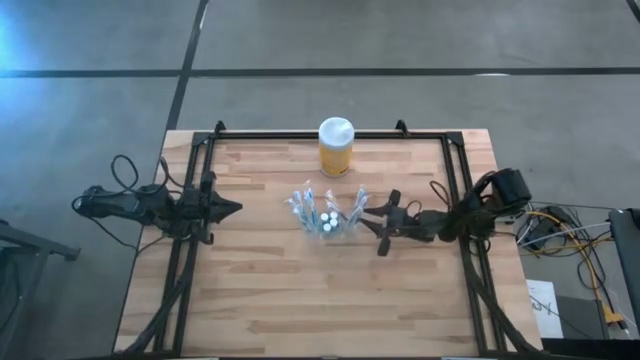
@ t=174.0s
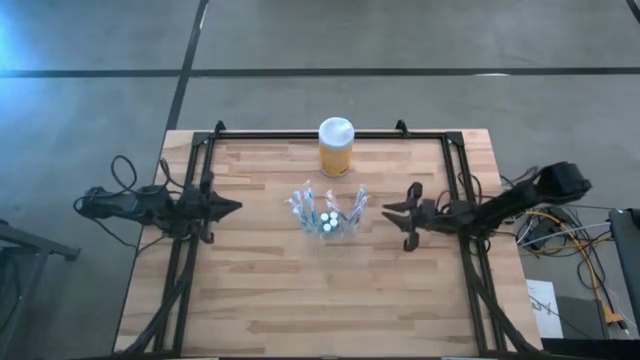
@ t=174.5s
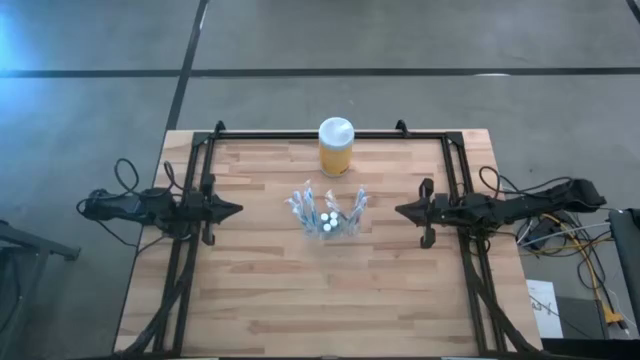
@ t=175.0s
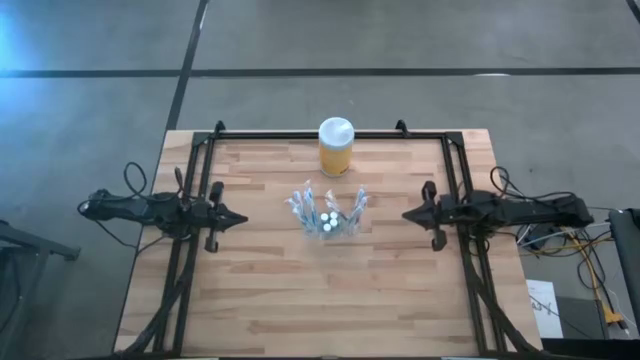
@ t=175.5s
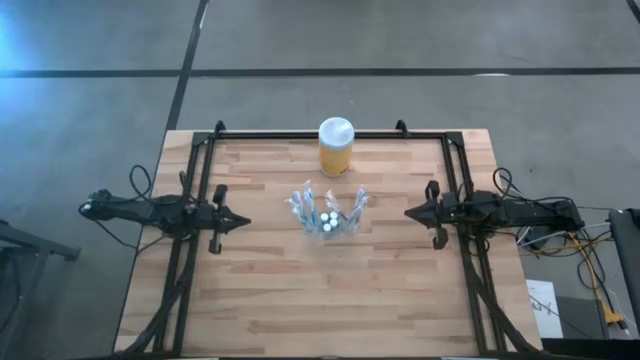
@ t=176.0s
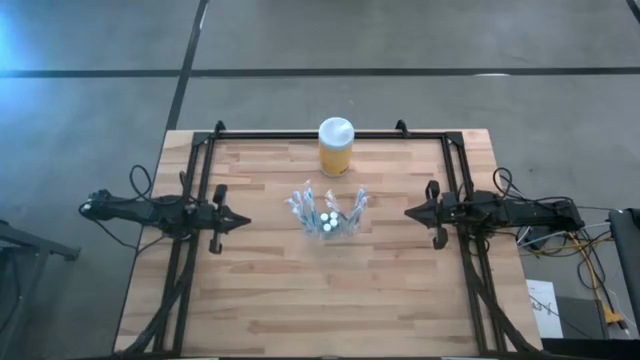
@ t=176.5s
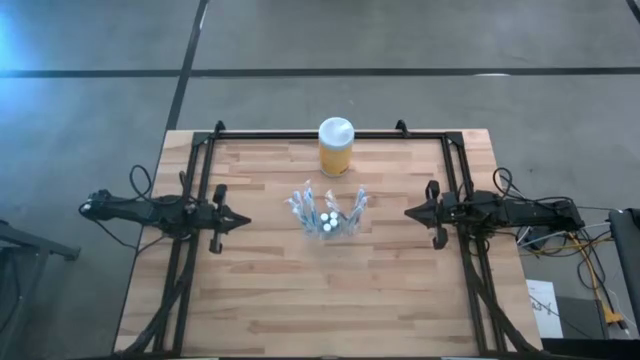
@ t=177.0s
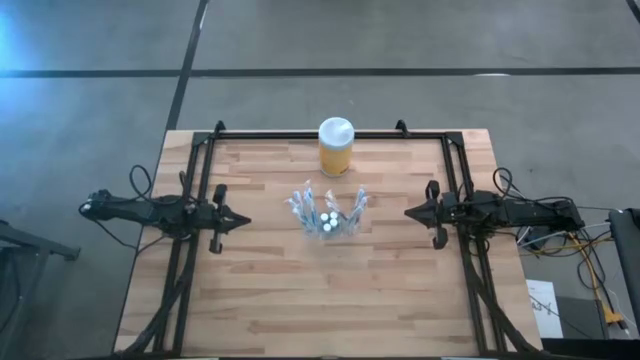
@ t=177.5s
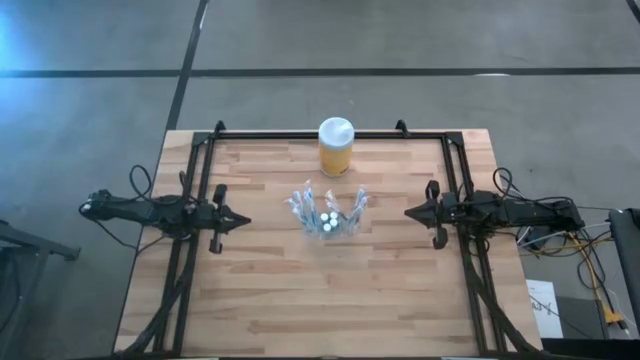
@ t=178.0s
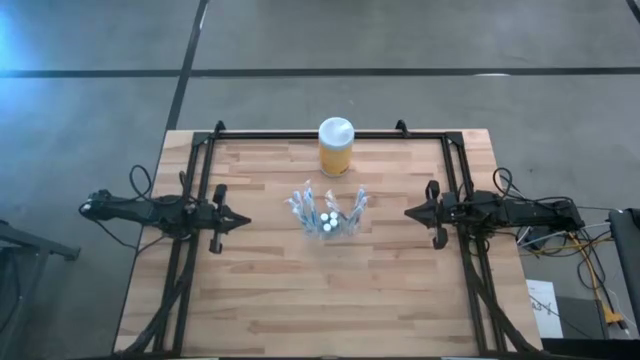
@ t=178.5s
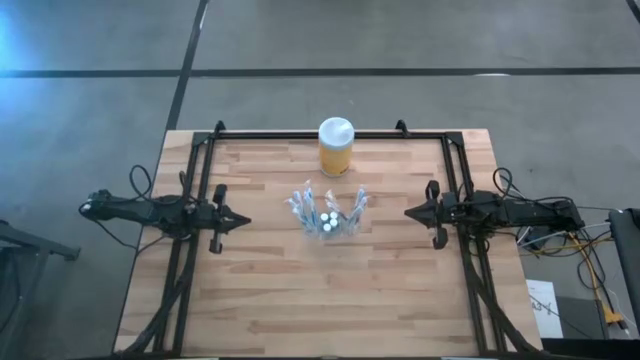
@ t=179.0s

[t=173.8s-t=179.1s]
Task: Pick & Place toothbrushing station
Return to Home Position

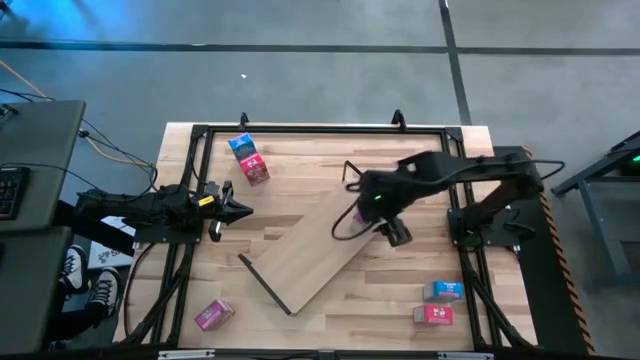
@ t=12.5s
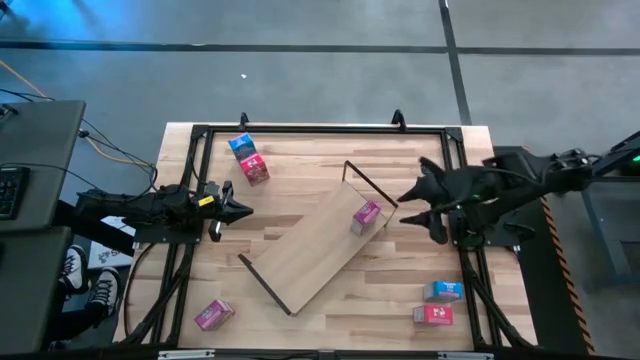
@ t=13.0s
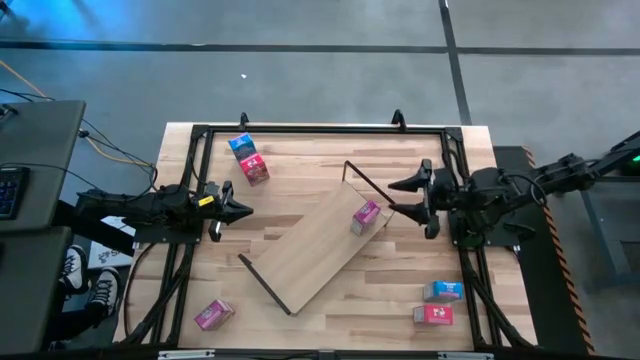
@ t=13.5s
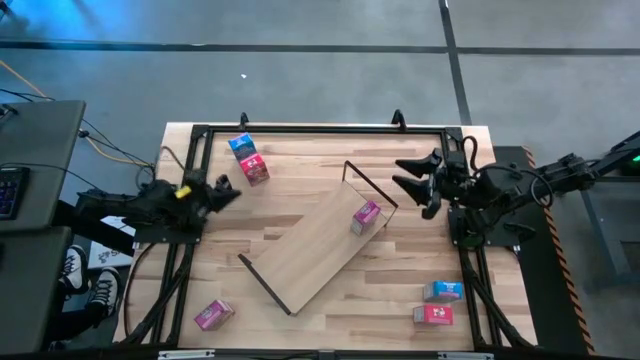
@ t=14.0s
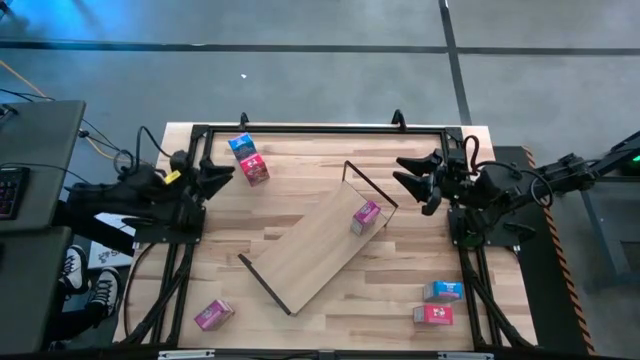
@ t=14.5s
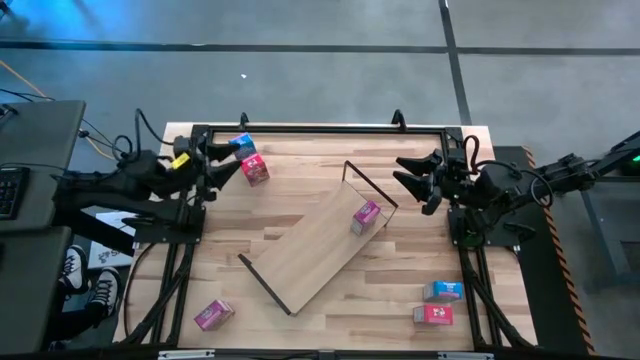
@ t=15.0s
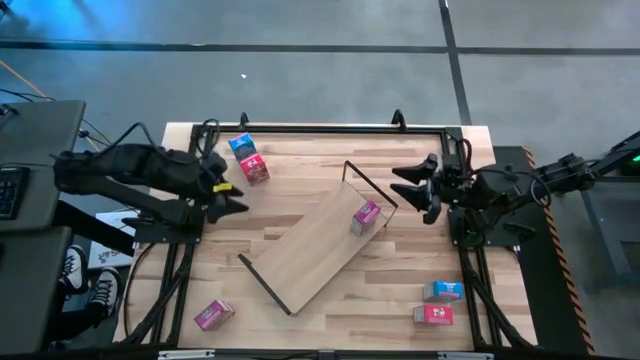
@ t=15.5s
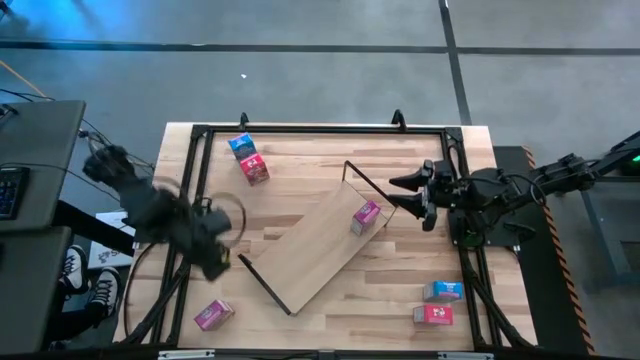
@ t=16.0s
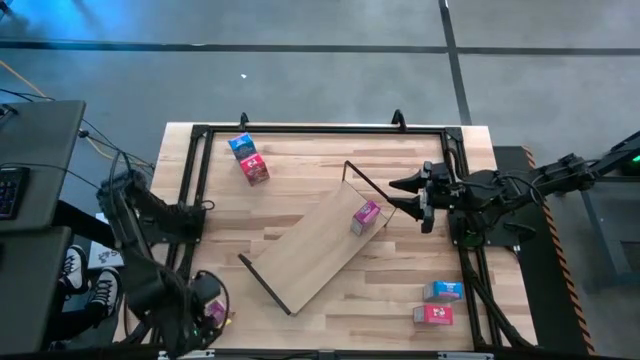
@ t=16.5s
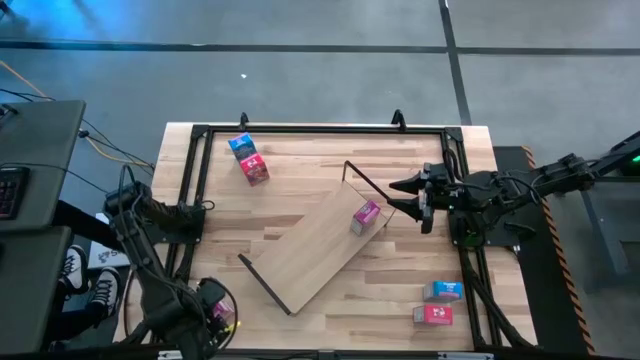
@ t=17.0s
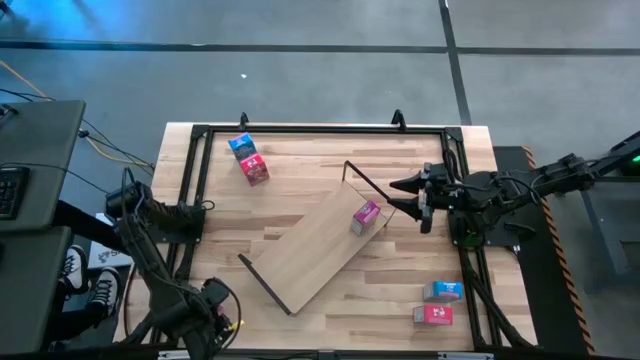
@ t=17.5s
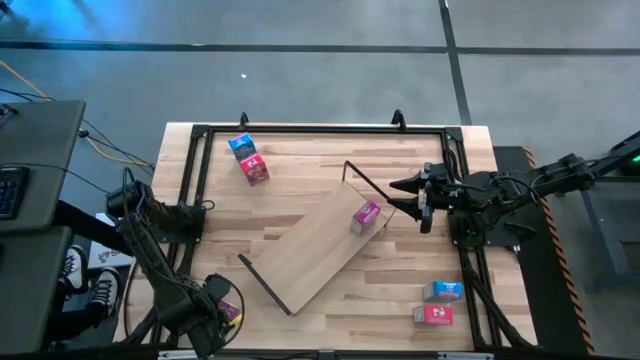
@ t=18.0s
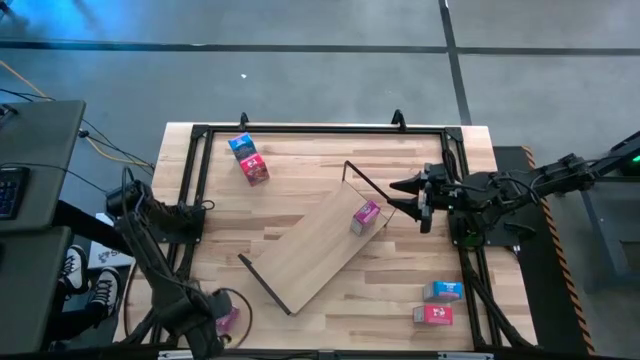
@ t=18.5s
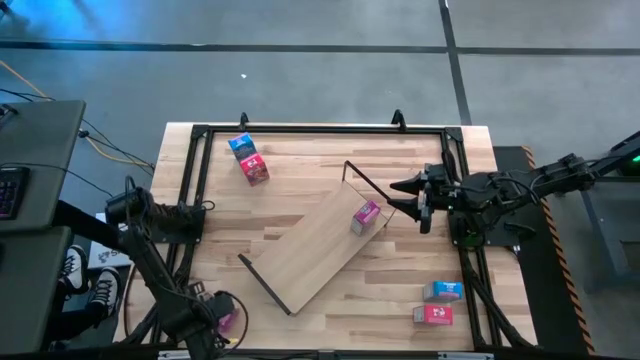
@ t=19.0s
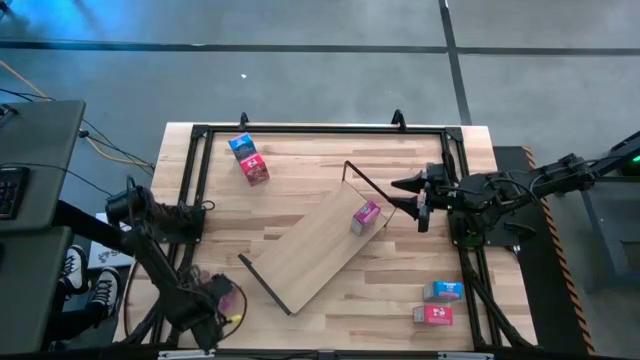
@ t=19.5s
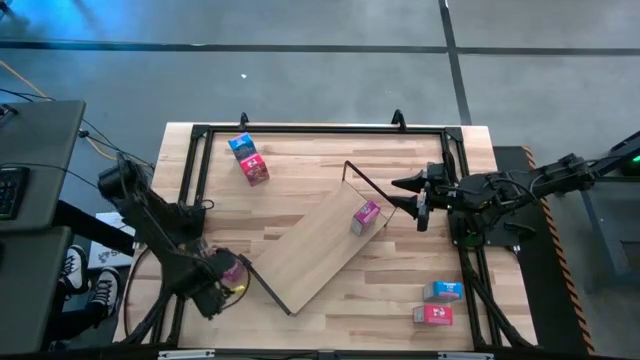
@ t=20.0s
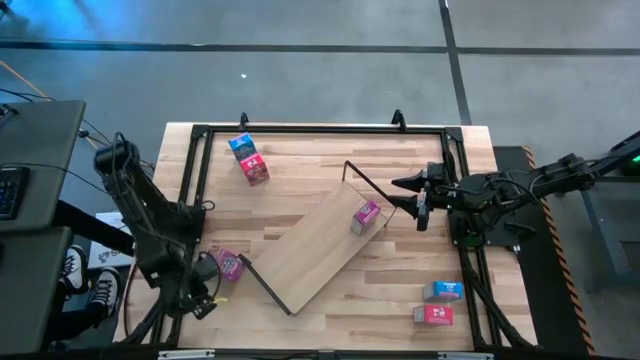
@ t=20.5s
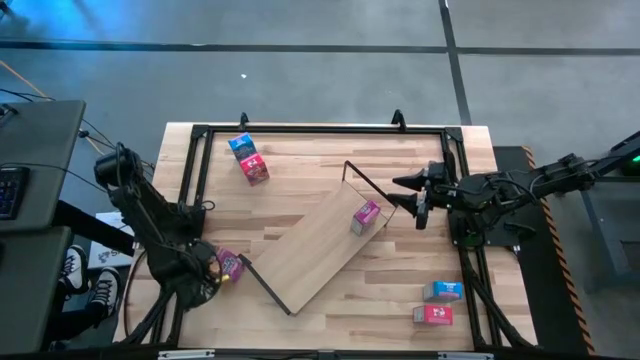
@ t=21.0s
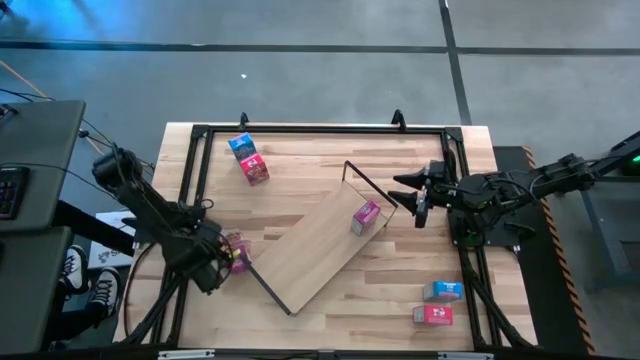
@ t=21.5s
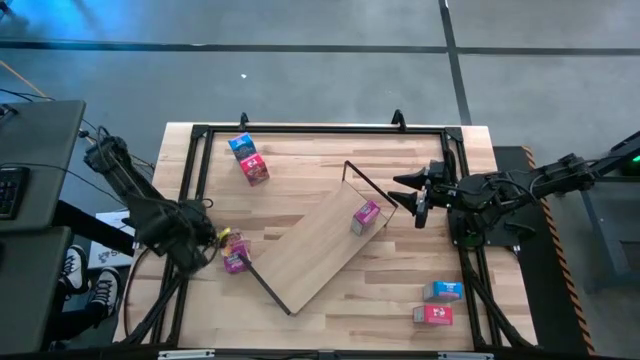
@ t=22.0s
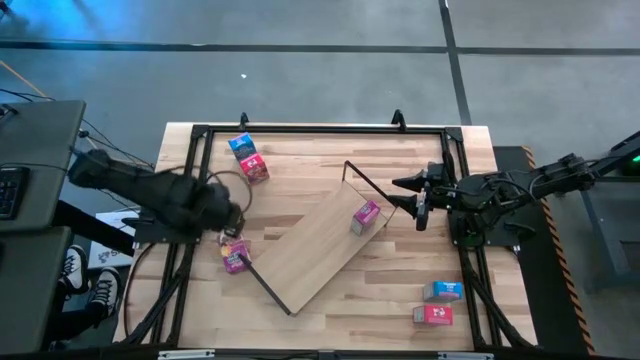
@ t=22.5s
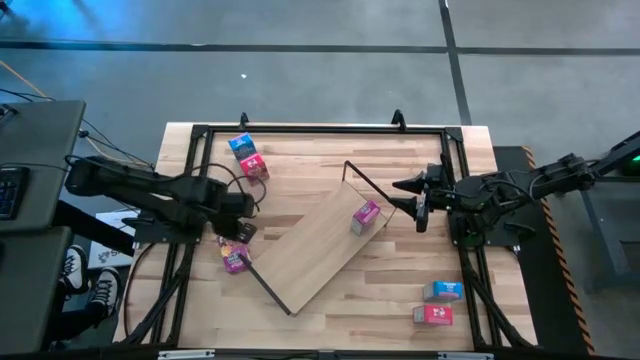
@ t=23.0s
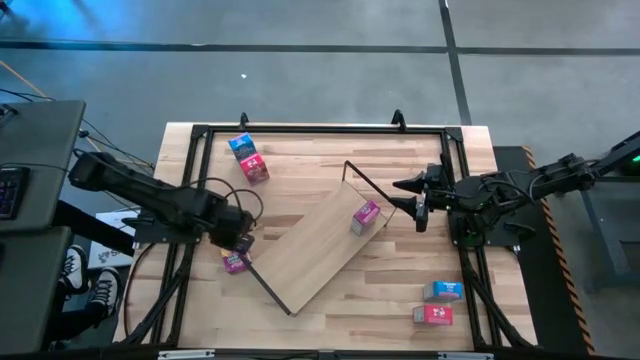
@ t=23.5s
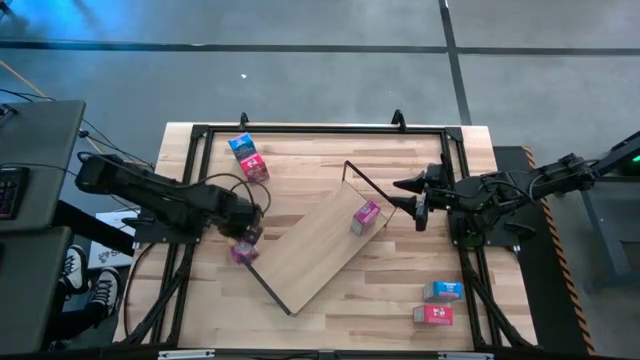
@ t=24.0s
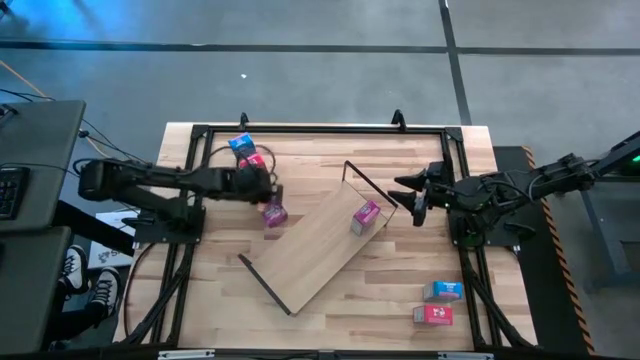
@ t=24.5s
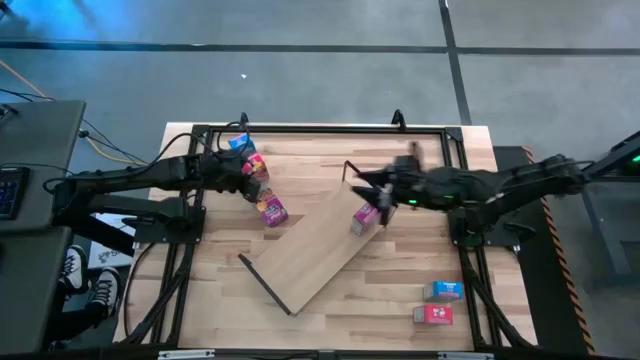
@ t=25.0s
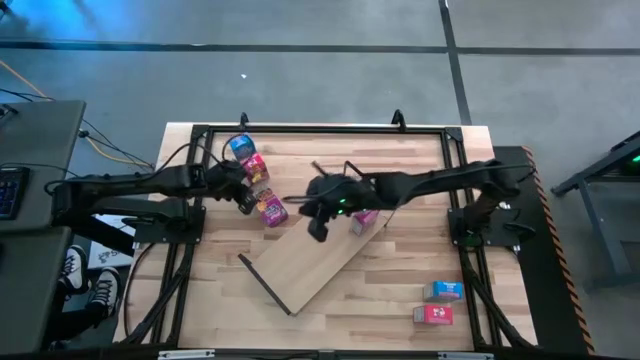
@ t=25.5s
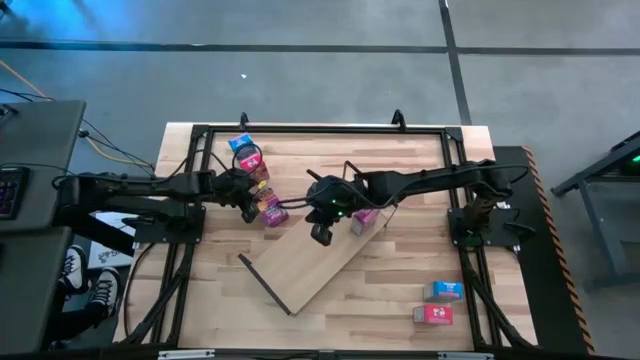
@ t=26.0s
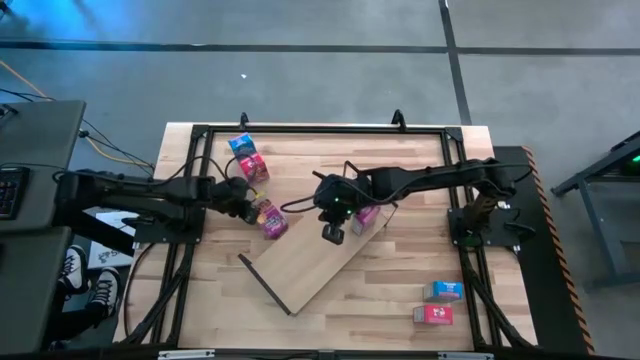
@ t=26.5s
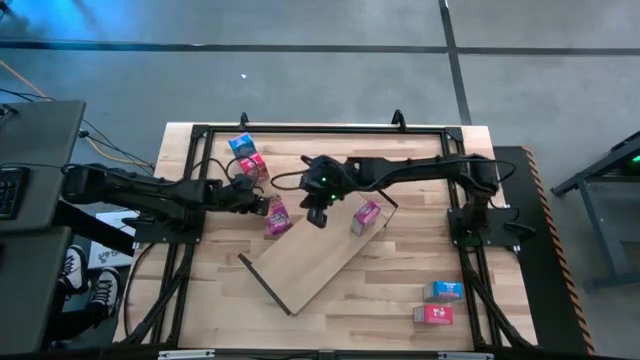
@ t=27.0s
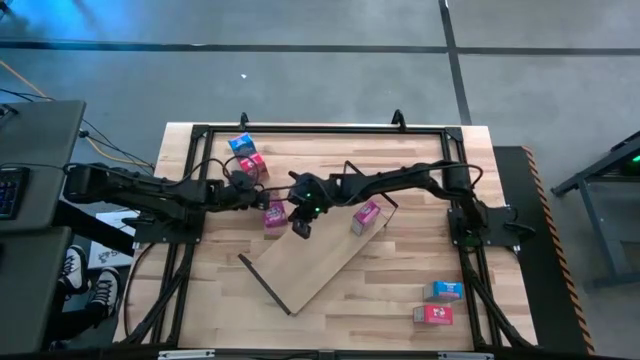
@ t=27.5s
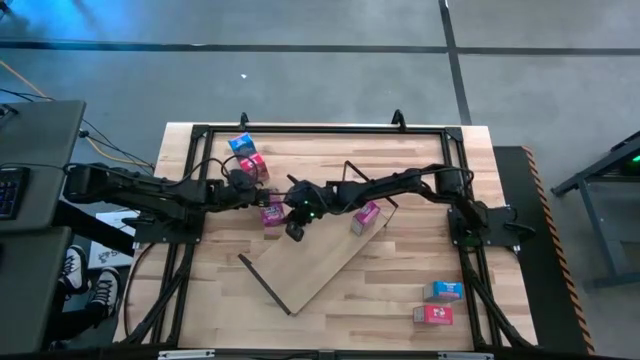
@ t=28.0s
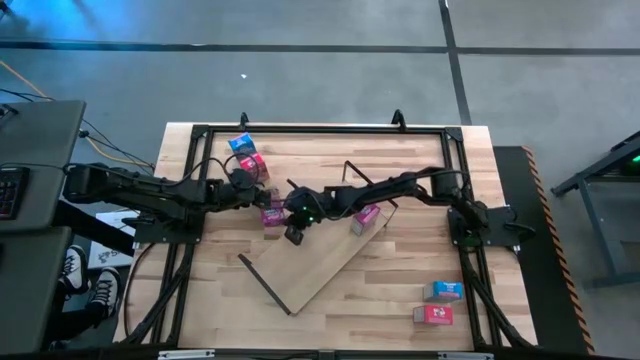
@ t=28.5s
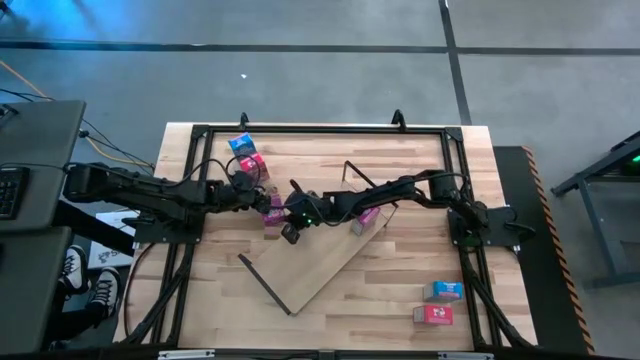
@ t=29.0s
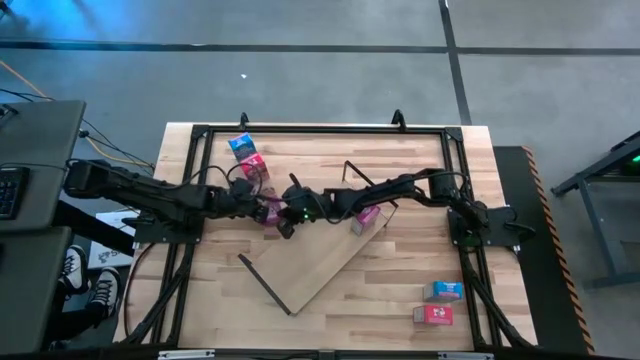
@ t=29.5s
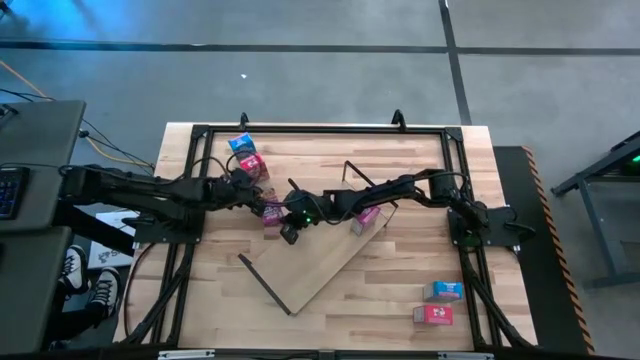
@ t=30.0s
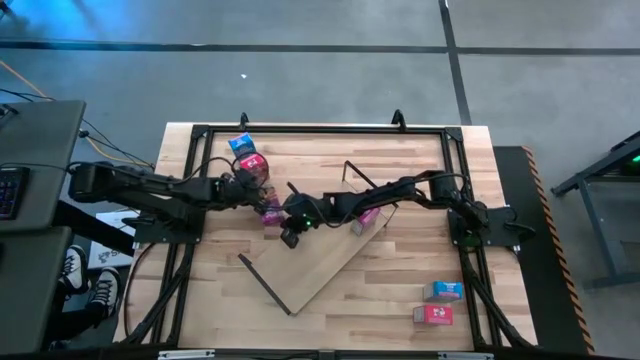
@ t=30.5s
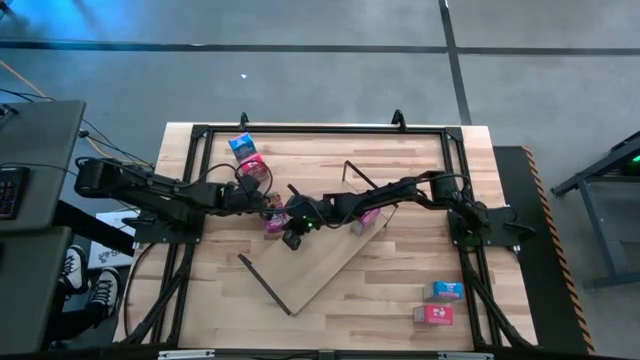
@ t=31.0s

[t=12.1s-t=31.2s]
Task: Stack cereal on shelf
Put the purple cereal box on the shelf aligned with the other purple cereal box
